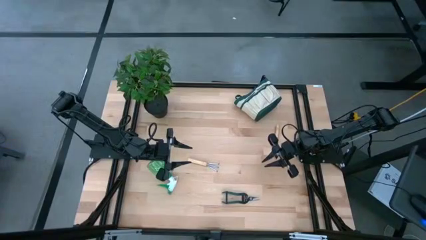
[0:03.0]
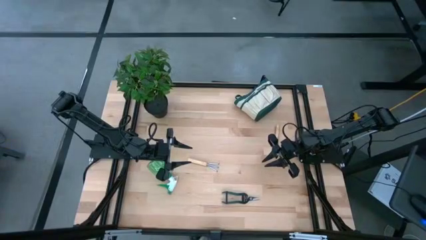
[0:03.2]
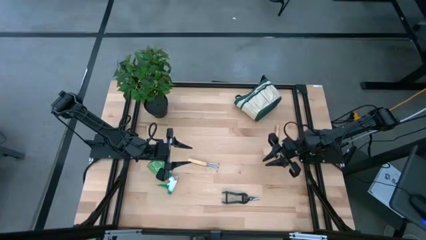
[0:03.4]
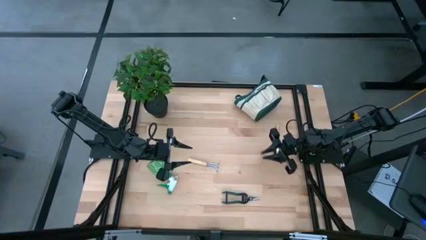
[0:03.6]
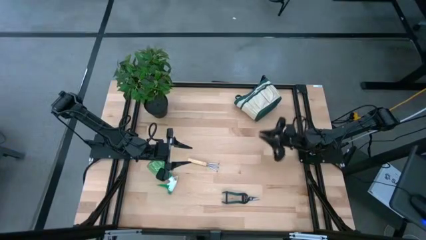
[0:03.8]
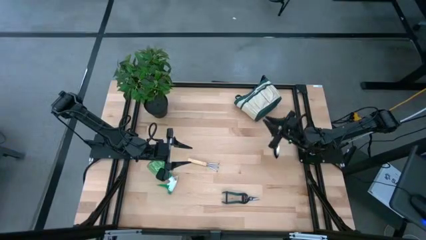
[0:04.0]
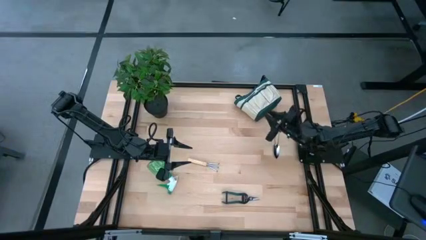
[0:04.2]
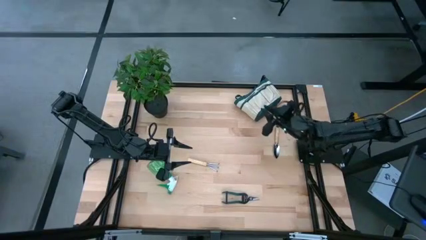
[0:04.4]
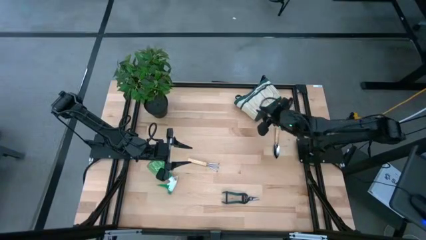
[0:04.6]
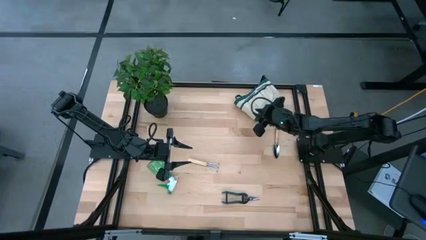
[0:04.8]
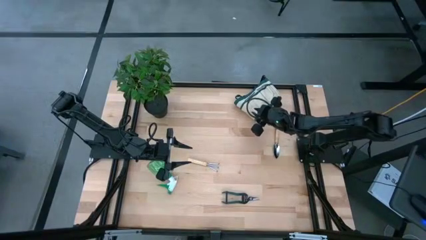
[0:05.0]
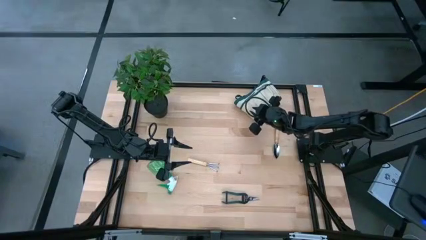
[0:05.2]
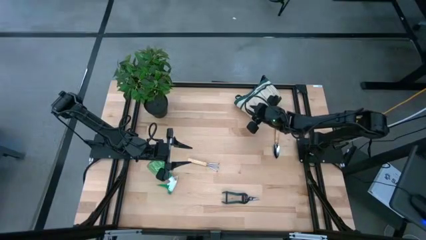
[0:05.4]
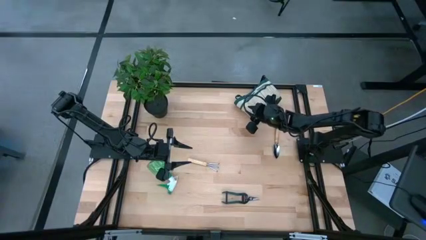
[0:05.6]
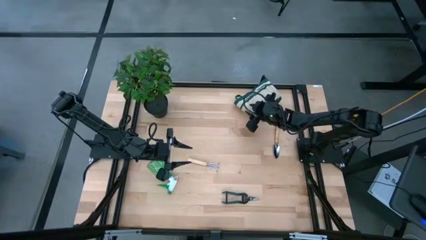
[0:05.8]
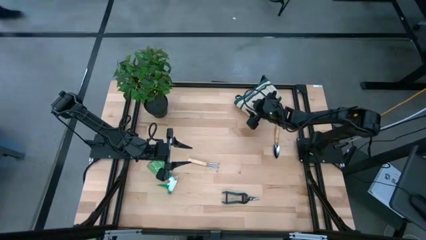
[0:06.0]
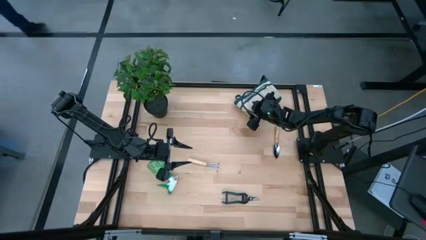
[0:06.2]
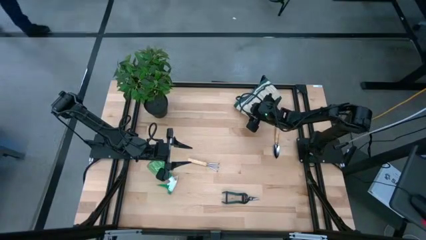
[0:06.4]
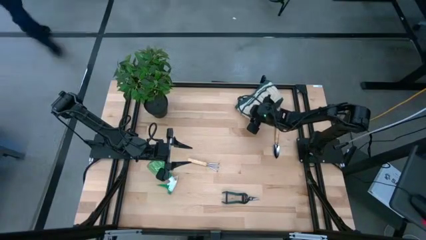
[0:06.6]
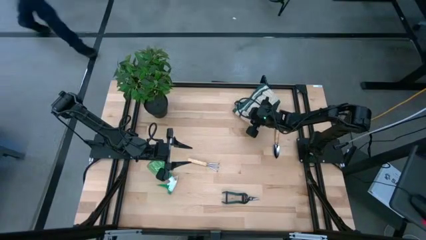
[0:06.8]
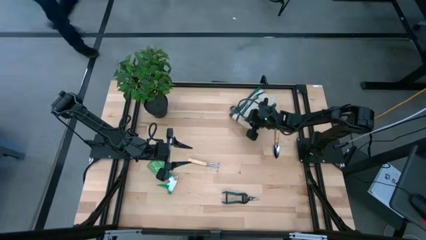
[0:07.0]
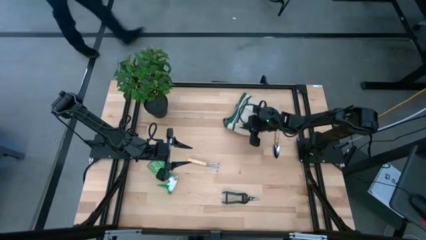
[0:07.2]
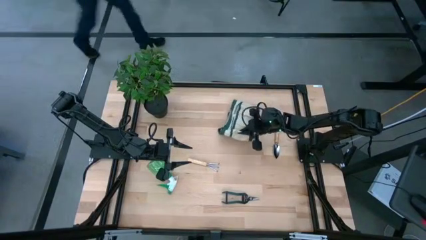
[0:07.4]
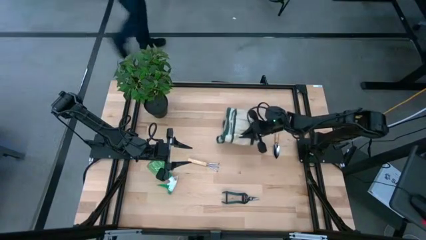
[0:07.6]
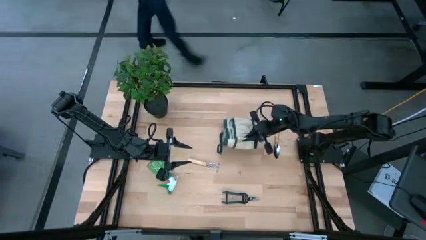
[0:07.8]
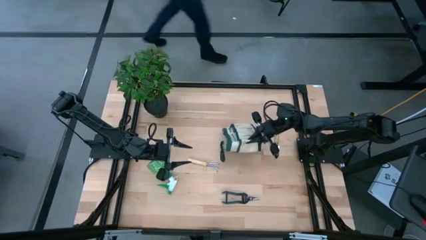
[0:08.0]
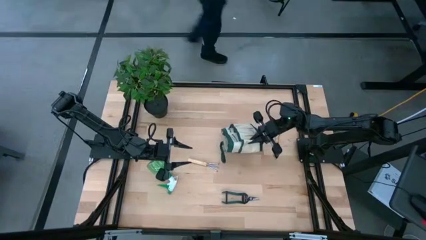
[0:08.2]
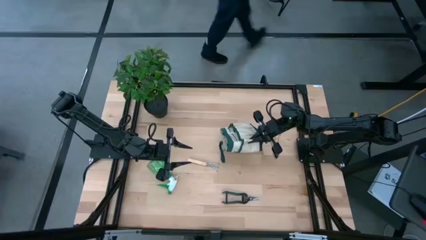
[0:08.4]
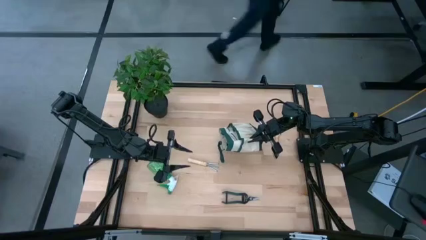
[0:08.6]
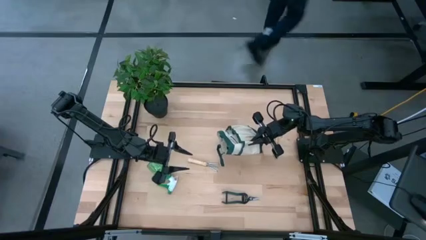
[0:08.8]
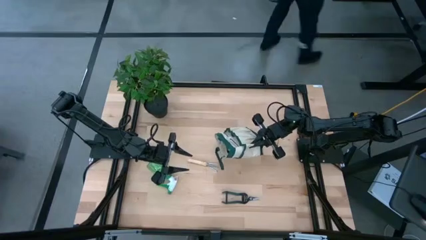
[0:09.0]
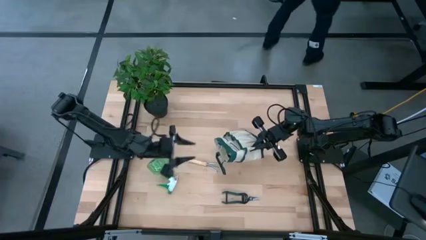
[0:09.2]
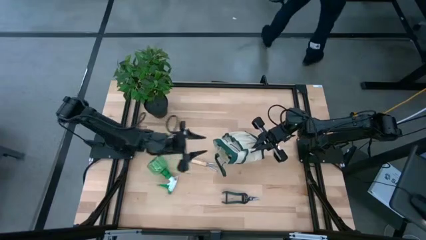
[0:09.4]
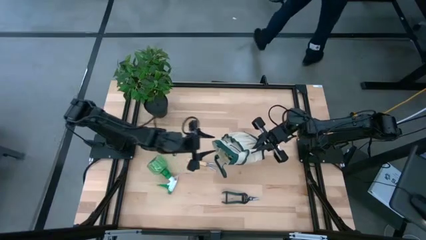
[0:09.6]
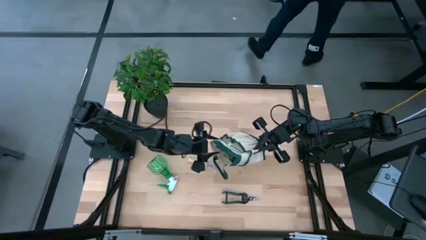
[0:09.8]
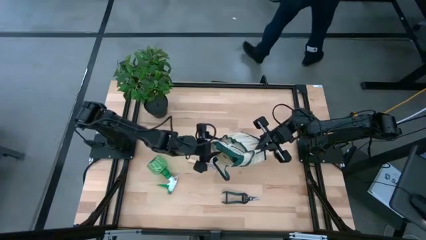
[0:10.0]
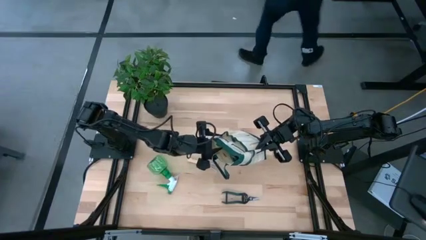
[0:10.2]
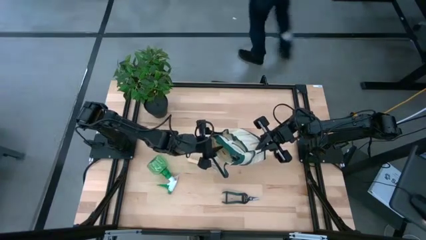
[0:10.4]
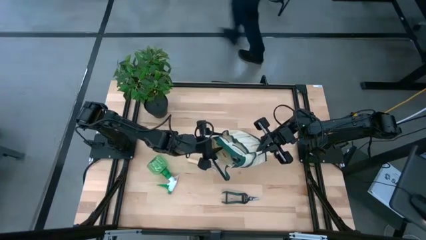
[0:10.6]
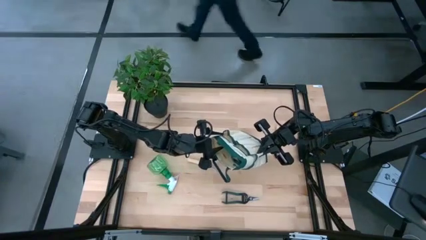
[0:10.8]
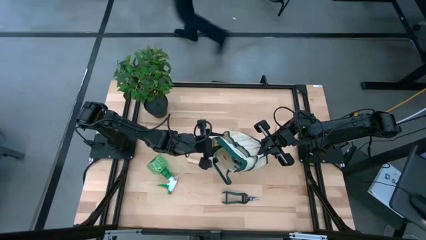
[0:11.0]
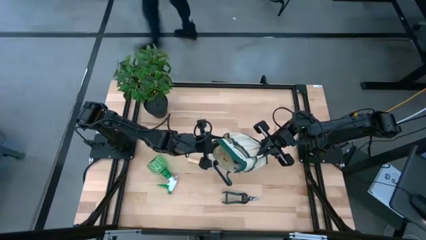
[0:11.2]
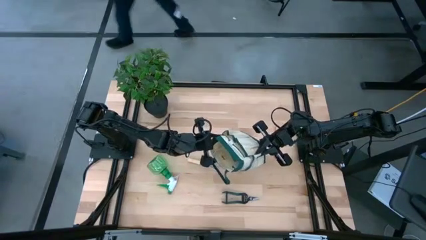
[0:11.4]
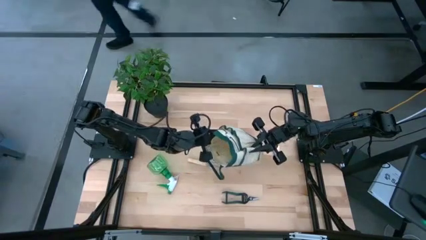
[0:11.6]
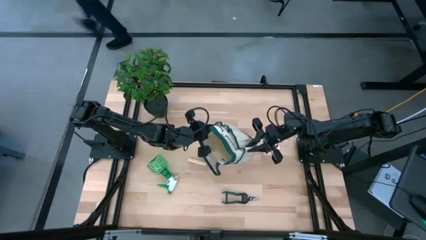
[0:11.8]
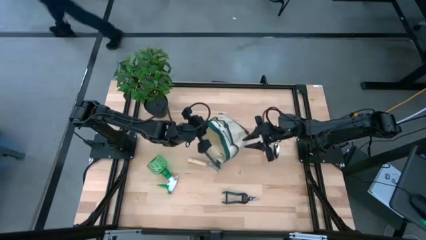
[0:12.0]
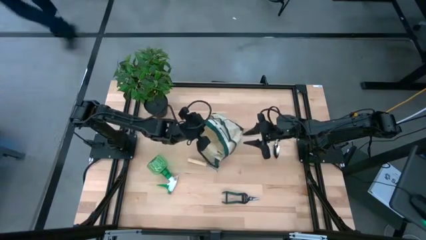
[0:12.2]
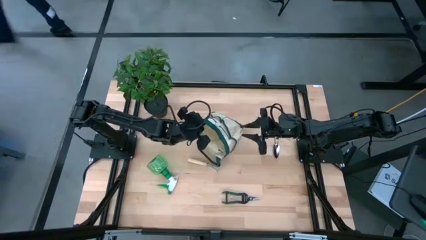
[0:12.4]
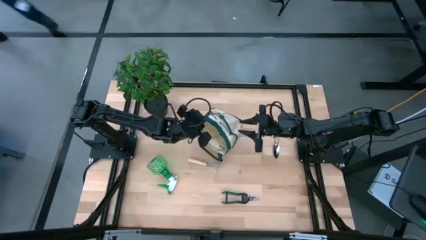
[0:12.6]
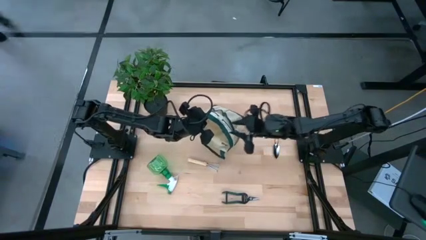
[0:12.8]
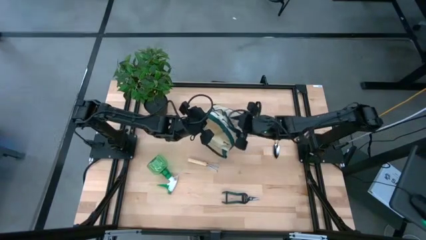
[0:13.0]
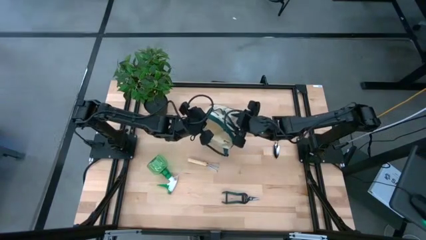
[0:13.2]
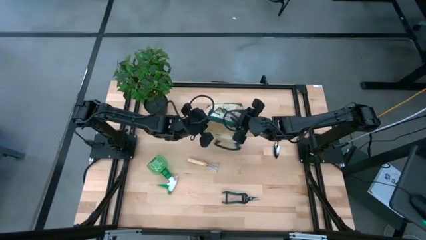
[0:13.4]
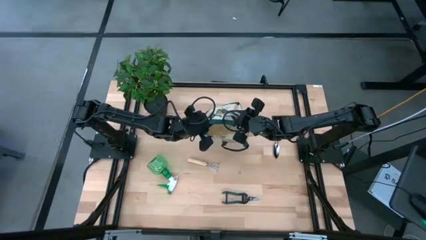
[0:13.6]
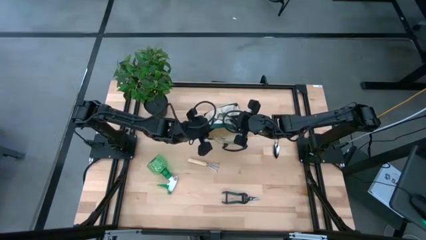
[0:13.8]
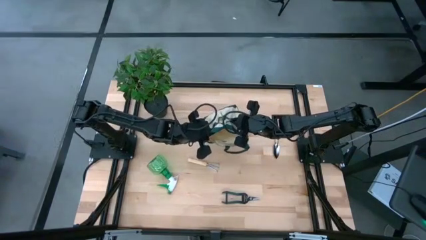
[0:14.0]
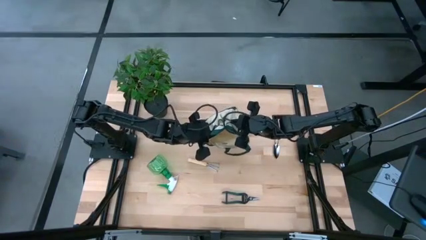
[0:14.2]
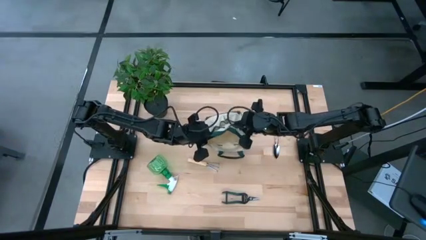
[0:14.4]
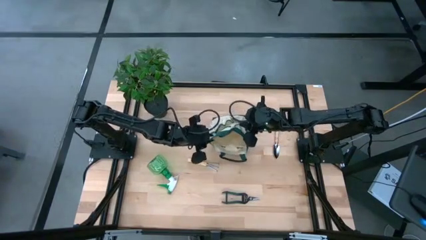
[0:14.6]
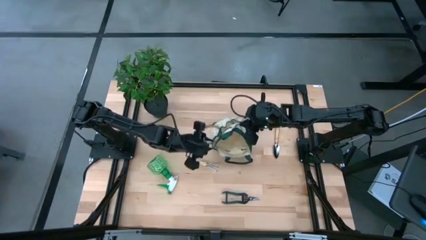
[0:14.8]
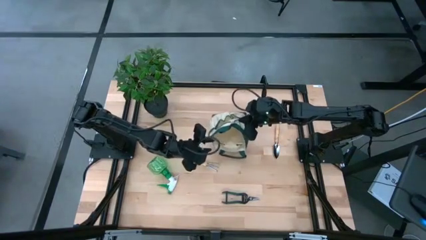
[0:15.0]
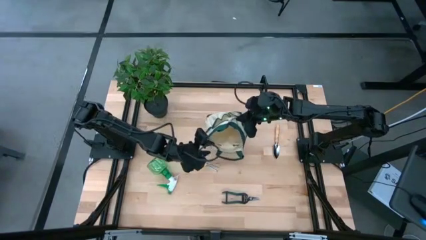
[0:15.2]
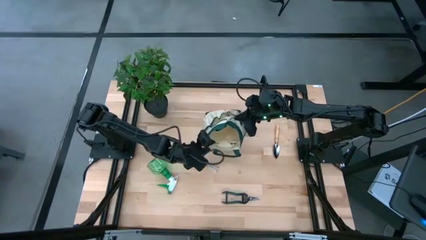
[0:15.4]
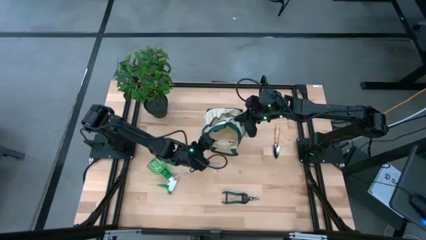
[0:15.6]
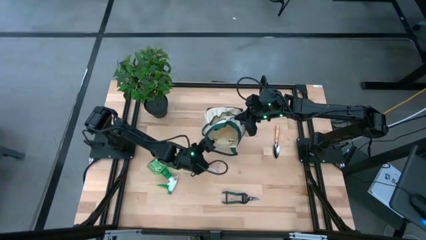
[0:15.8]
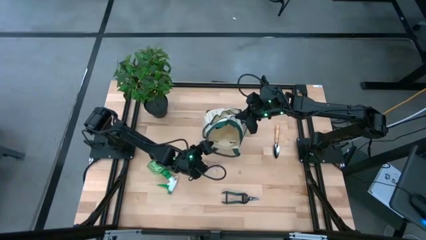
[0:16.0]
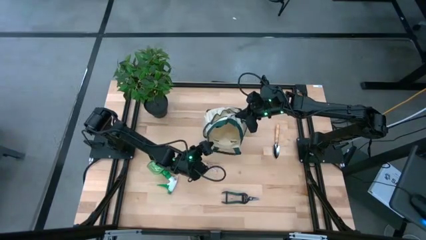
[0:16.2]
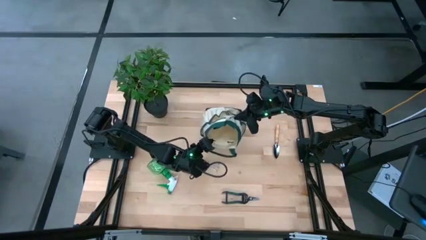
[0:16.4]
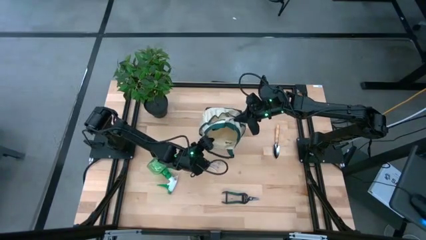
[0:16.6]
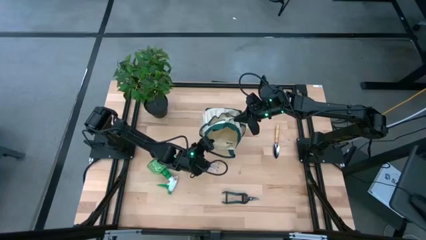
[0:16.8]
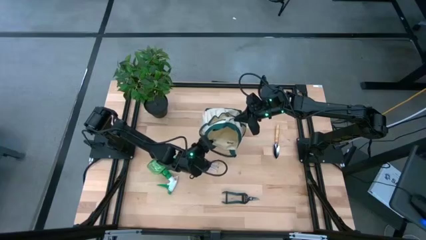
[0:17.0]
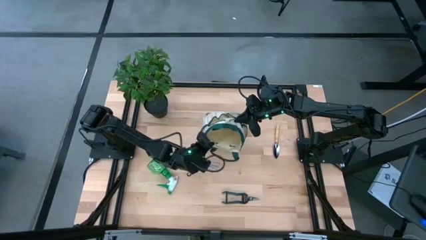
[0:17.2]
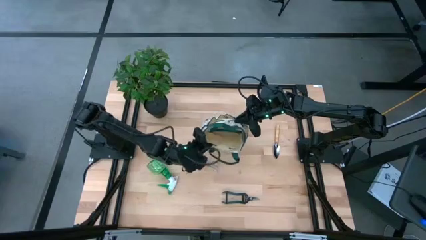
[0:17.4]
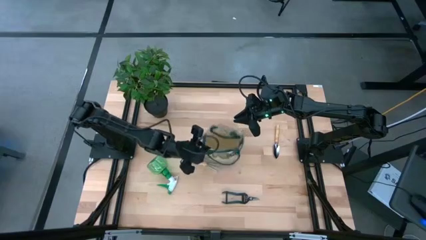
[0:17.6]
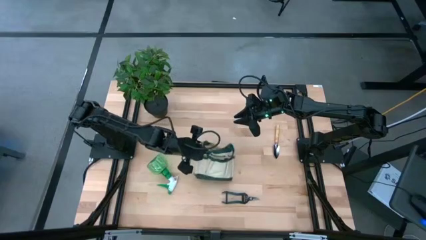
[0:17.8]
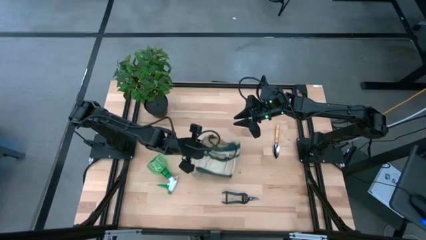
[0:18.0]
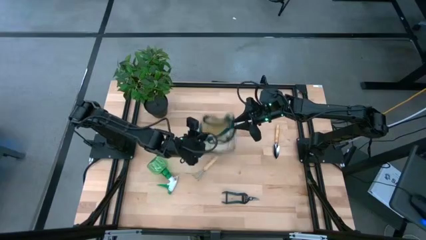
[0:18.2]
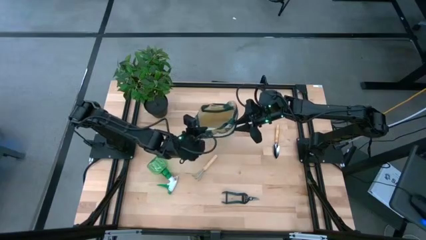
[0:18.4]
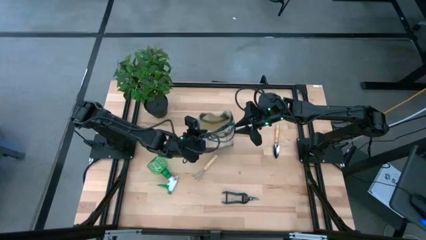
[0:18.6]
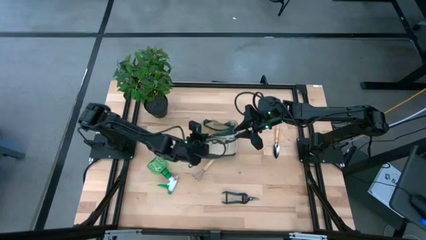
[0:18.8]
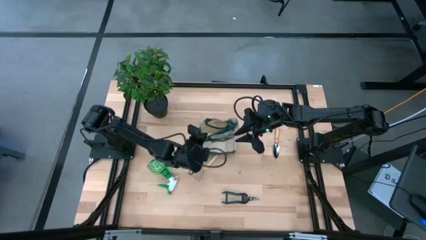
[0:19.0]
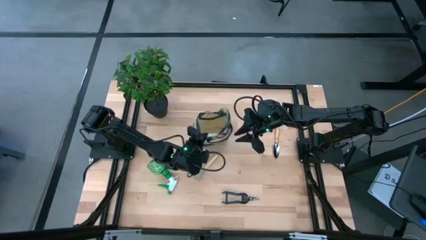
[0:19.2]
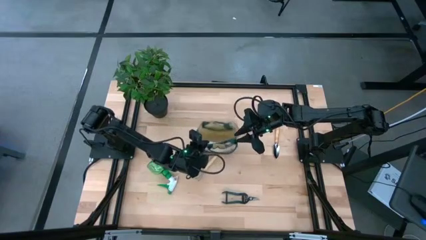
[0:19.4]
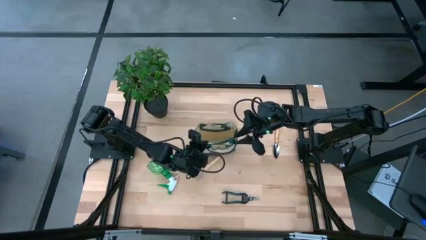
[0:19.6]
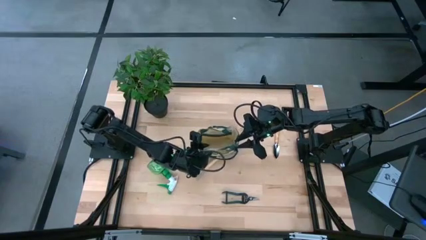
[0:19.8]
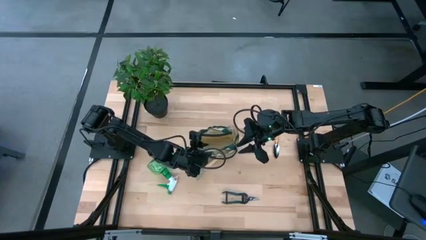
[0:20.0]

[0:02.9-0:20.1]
Task: Pick & Place Garden tools in Gardening bag
Prepare the green gardening bag
